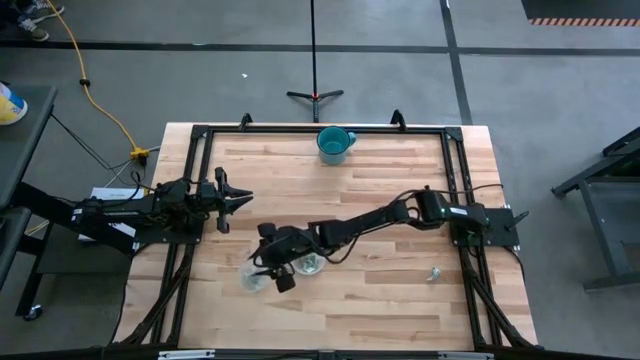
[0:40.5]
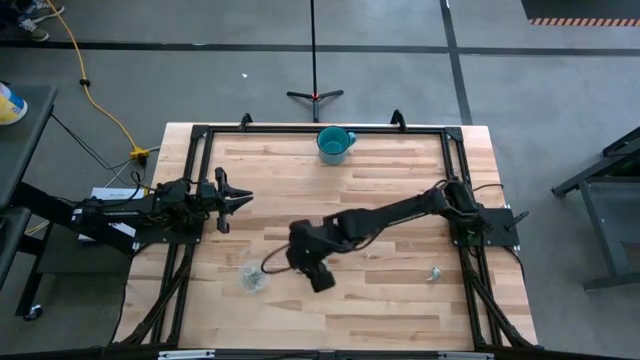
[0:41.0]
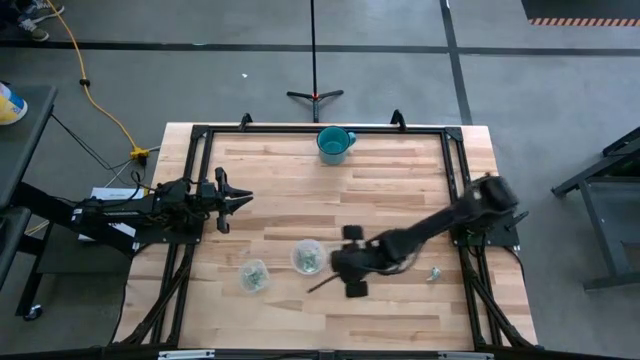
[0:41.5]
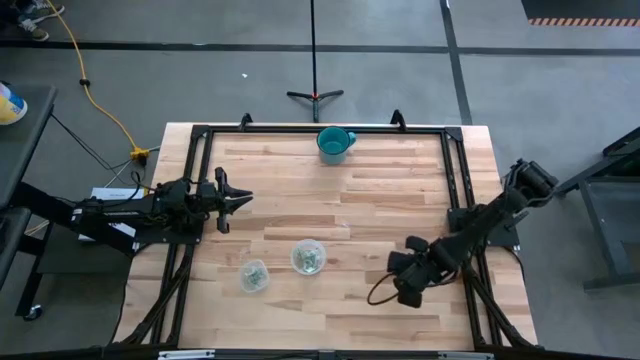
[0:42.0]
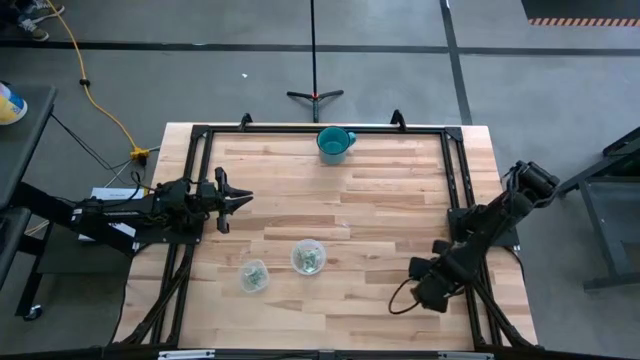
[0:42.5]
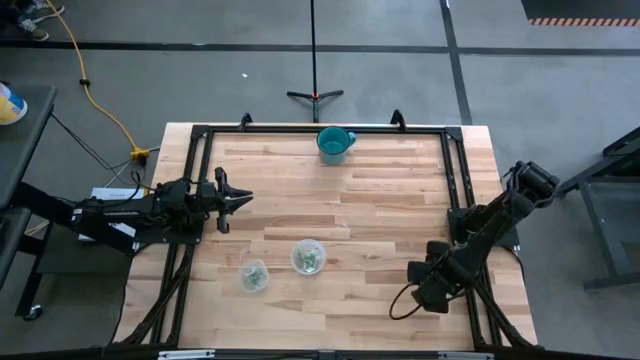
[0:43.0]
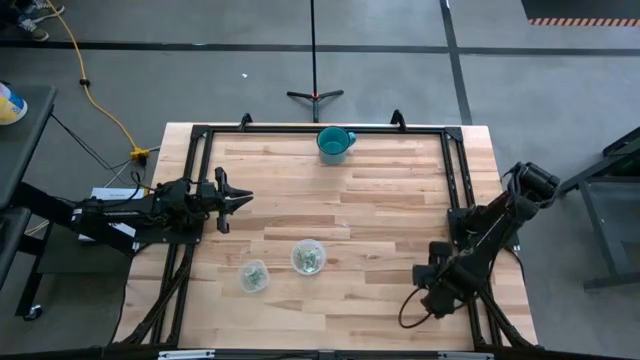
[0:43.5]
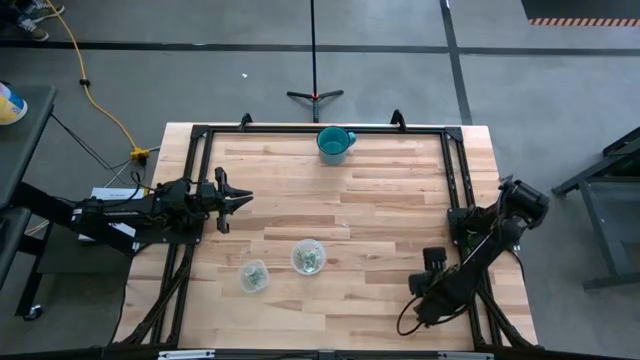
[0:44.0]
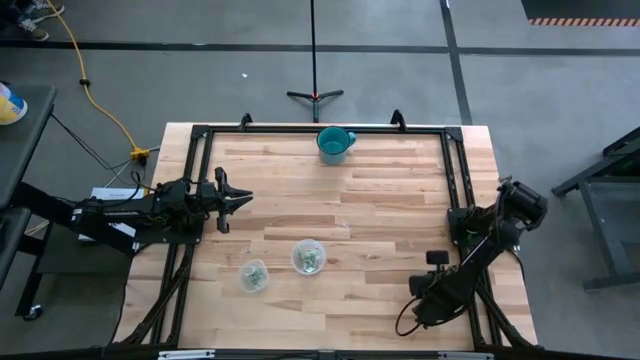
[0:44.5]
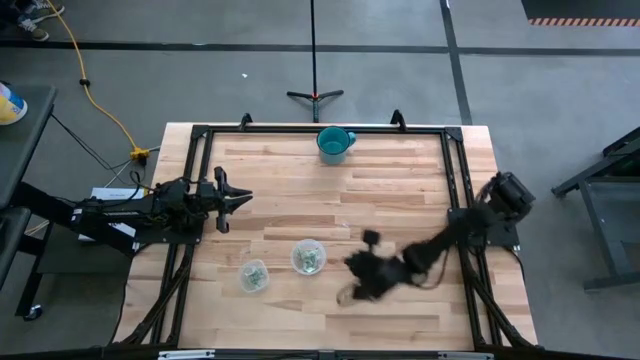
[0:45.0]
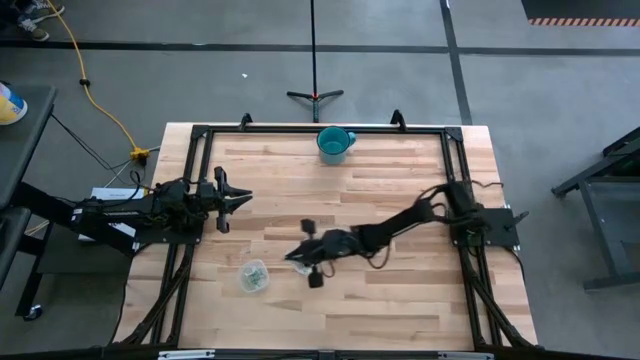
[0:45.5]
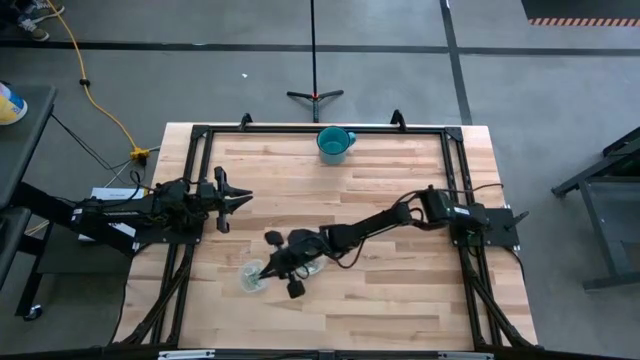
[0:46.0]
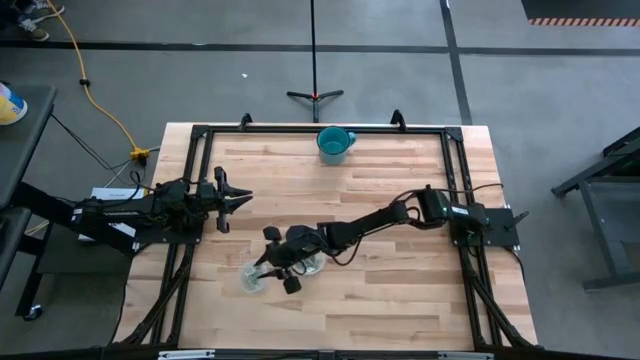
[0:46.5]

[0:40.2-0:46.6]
Task: Pick and place items into bin
Put the stevia packet into the left transparent bin

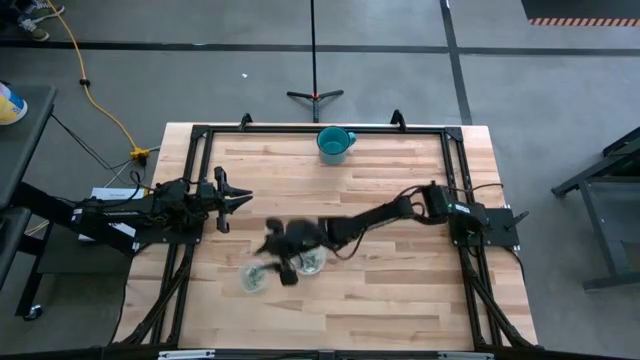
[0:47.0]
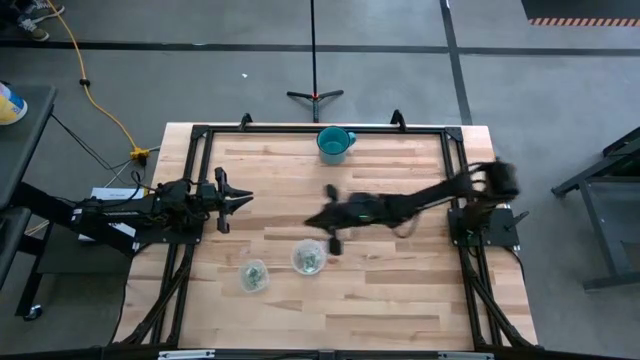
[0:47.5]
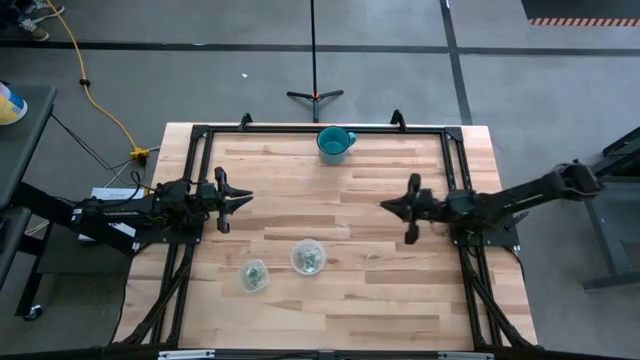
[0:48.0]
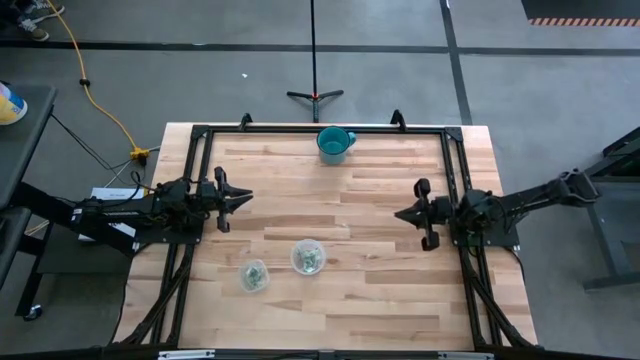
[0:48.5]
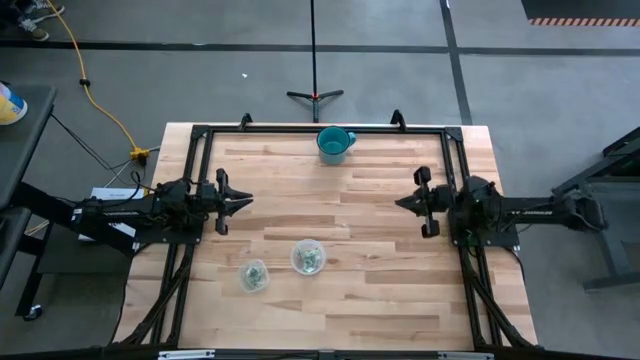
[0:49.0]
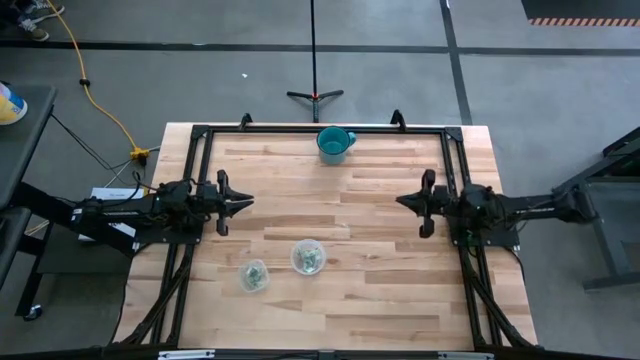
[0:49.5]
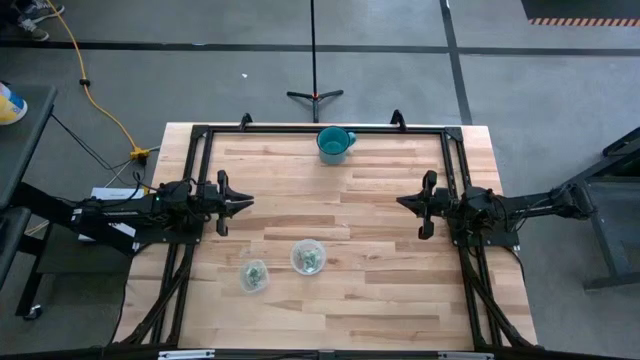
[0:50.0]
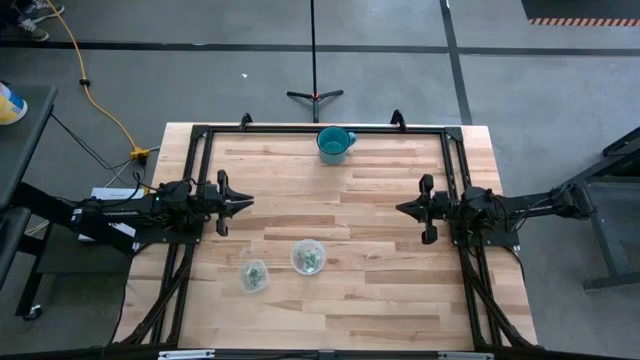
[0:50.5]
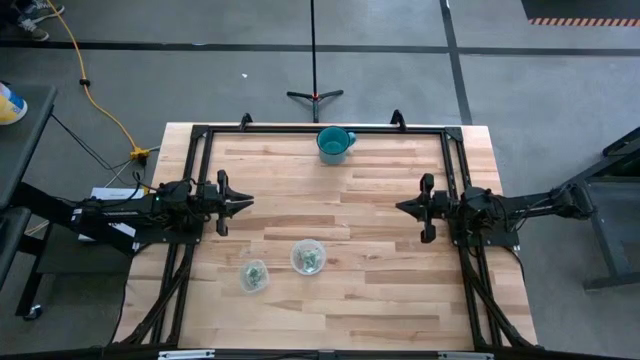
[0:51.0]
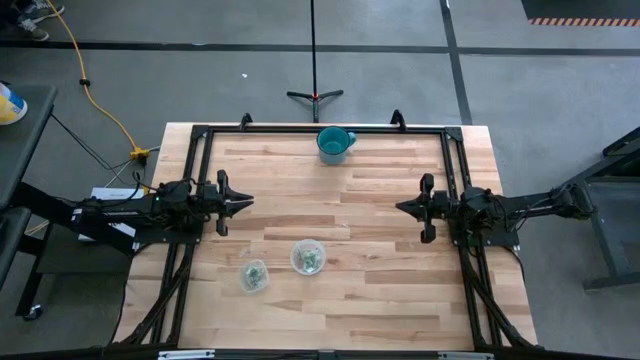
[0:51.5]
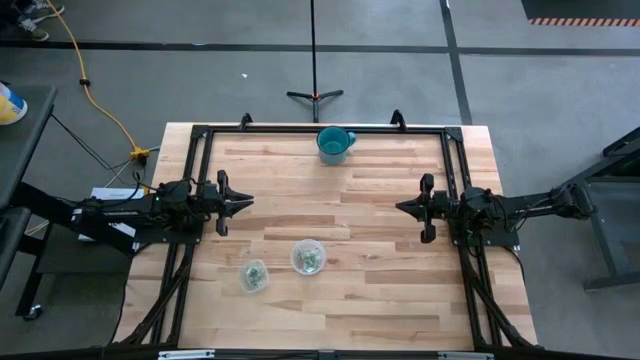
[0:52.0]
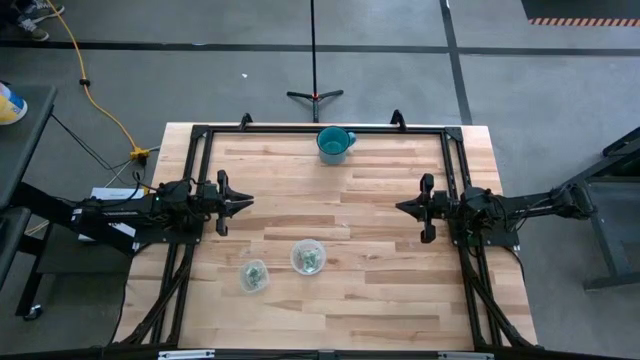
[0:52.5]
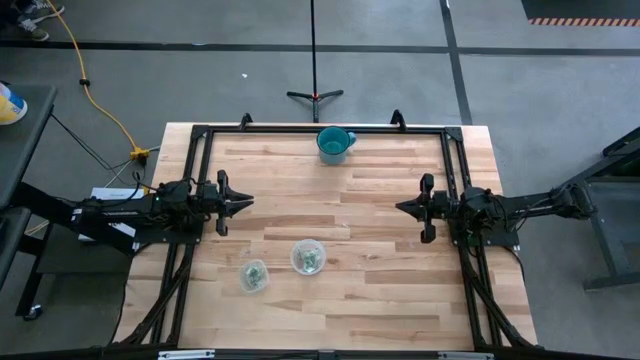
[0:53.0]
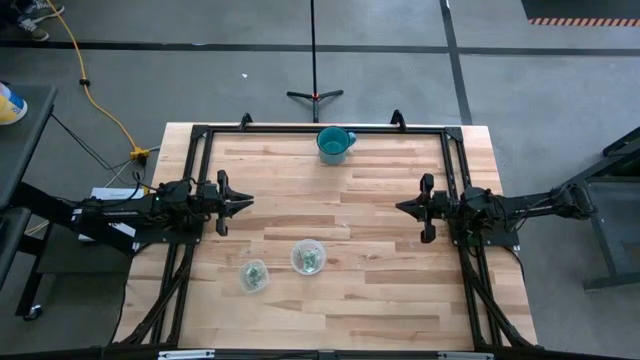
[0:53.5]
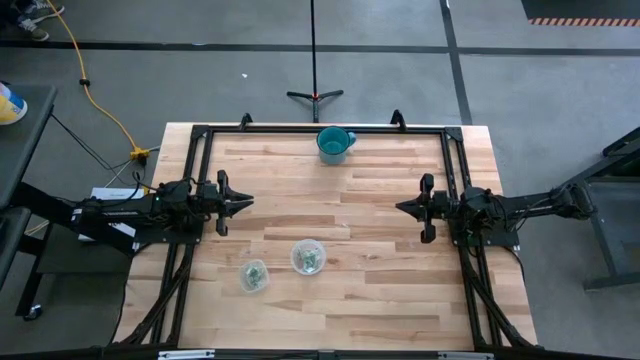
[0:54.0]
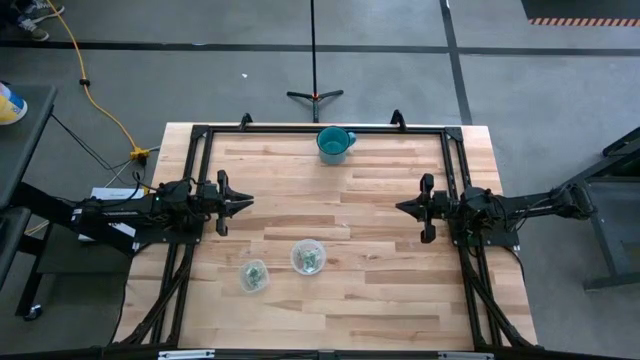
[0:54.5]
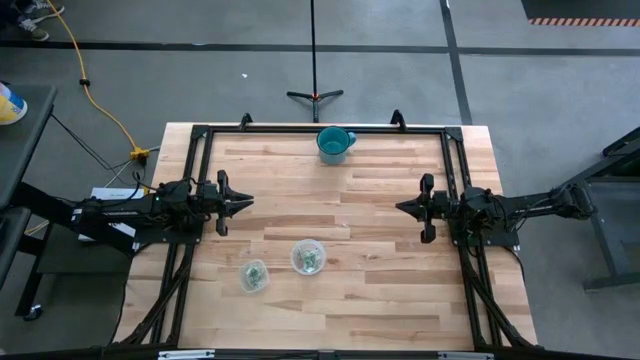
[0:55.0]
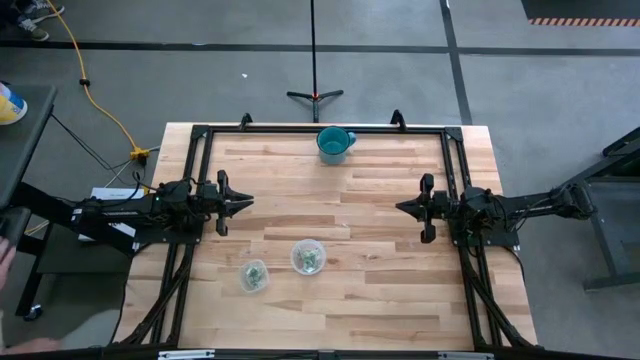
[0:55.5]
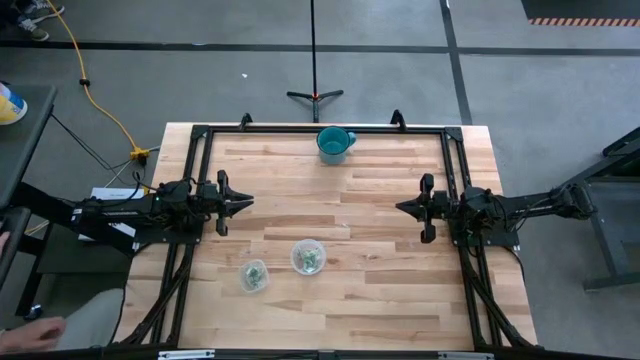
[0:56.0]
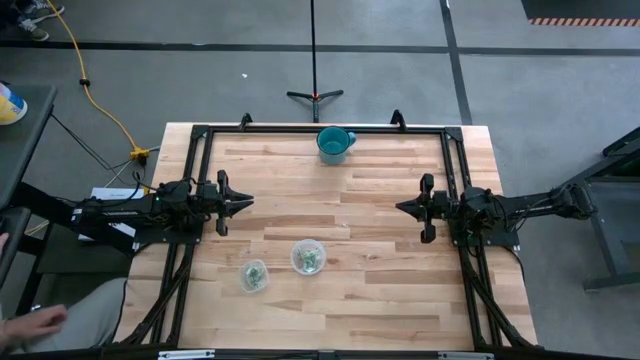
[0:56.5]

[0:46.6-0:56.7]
Return to Home Position

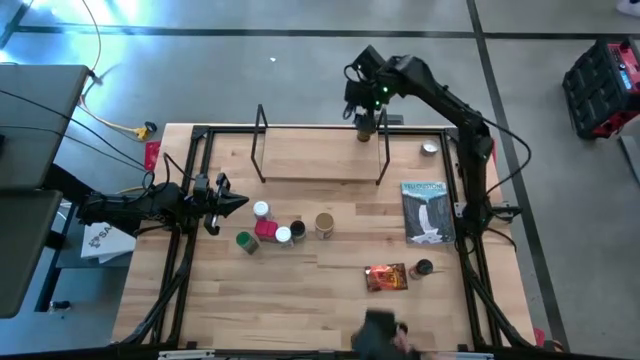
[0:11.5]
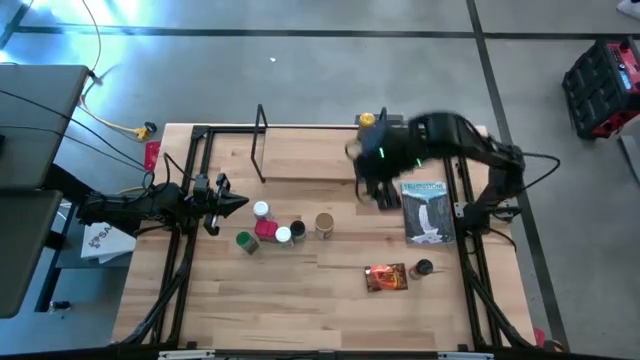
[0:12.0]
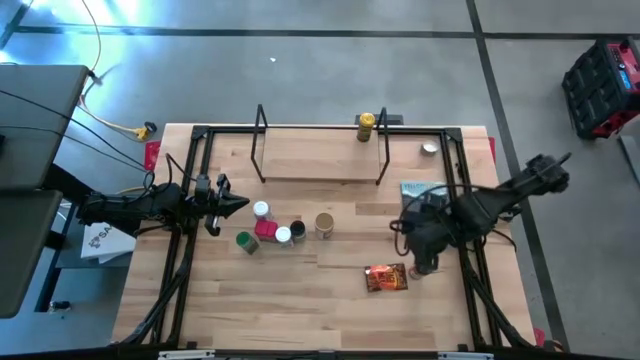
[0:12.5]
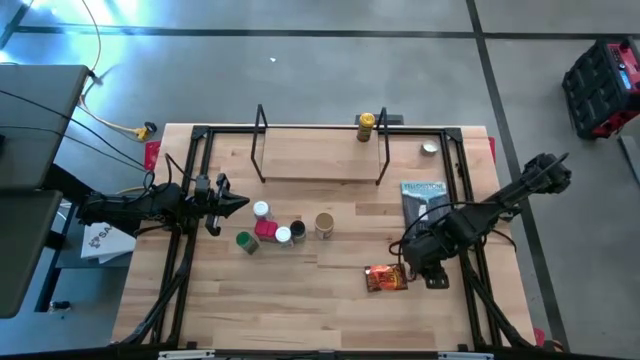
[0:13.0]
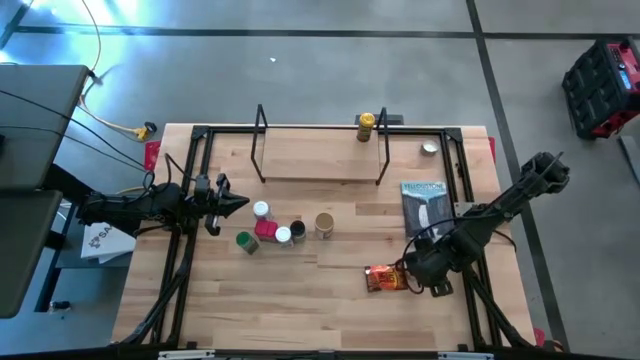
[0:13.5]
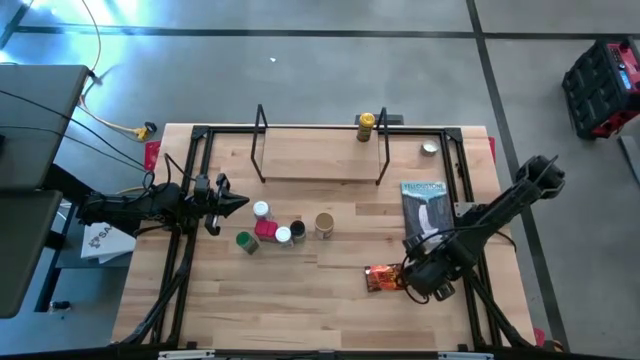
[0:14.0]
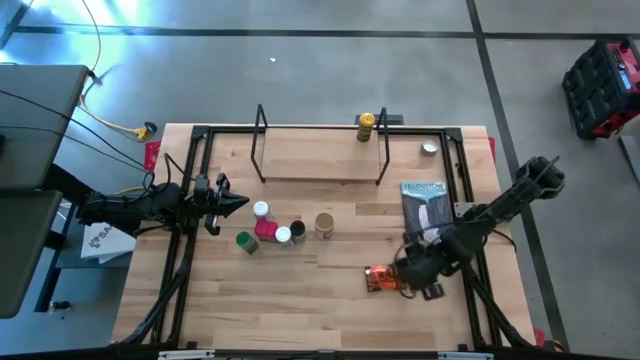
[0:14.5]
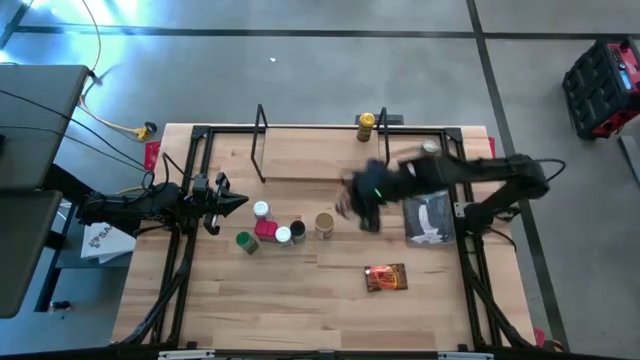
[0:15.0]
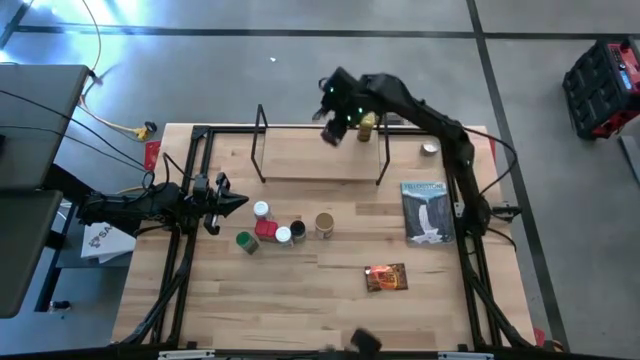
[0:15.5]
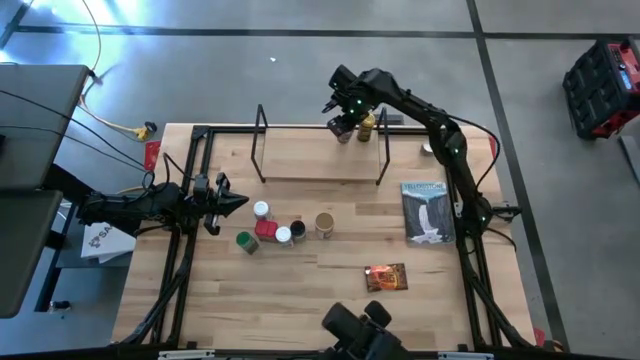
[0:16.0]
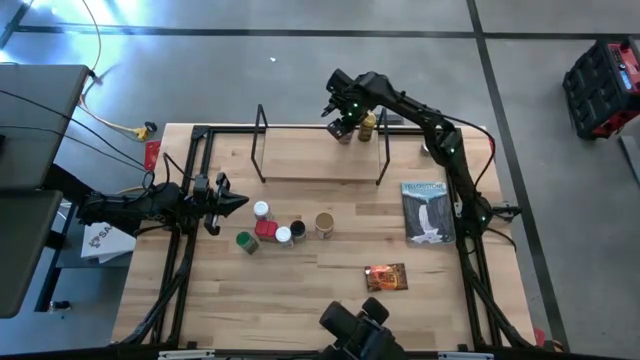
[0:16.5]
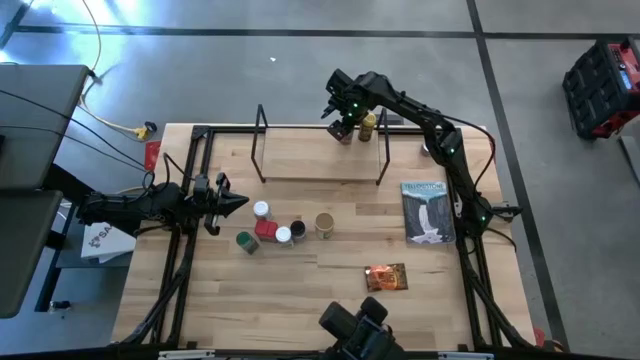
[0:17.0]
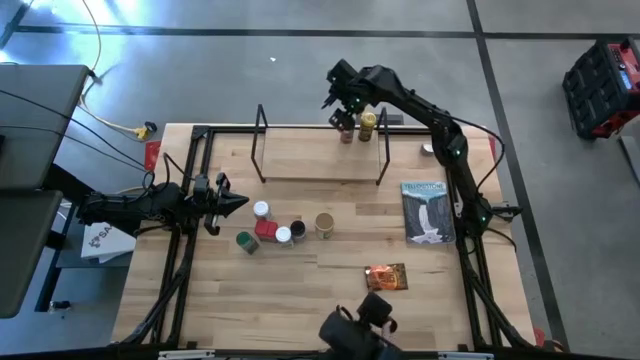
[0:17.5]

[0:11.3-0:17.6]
Task: Shelf spices
Put the orange seasoning bottle on the shelf
